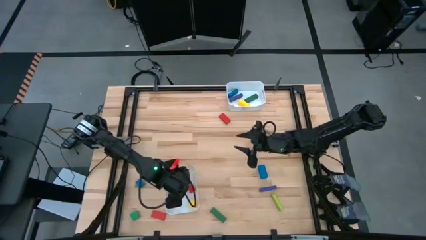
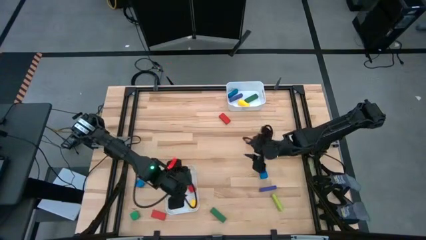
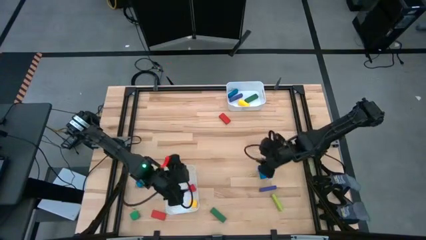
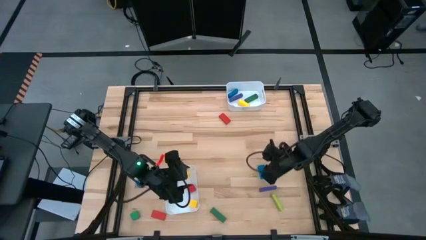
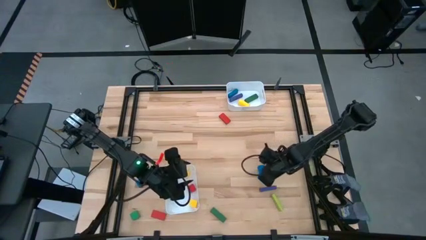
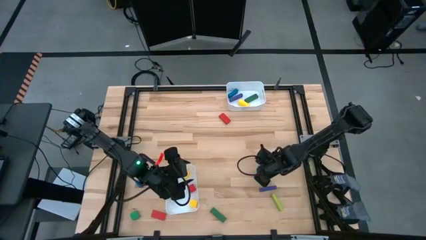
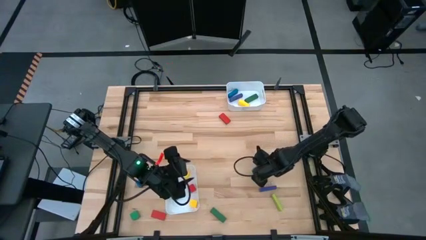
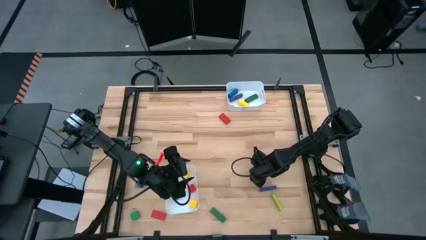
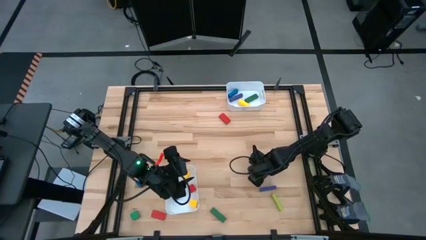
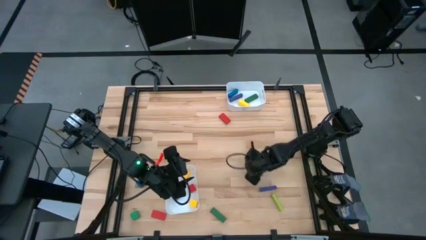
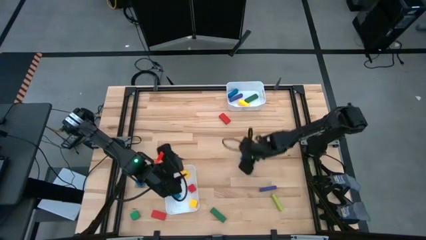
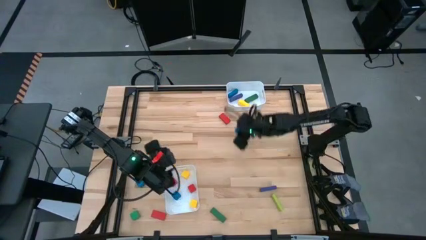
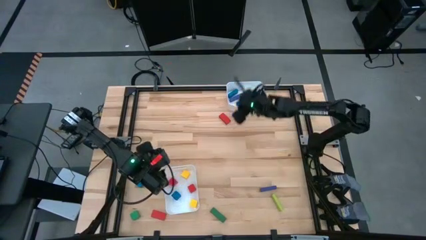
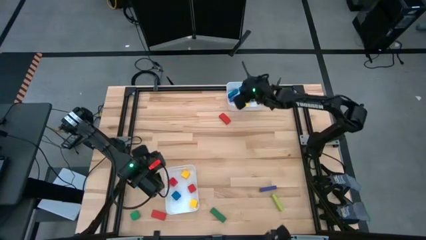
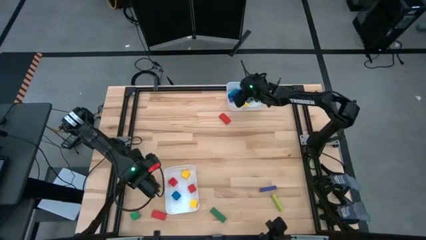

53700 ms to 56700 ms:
Task: Sort blocks by size
Put the blue large block into the top white bin

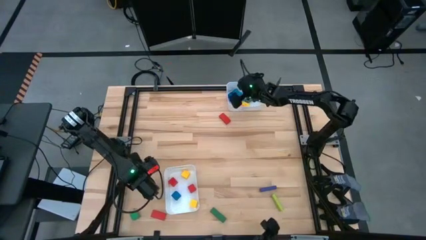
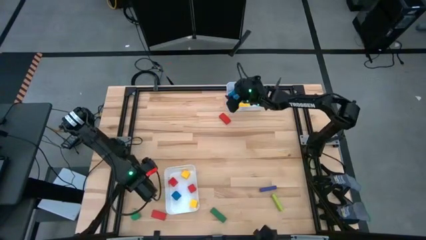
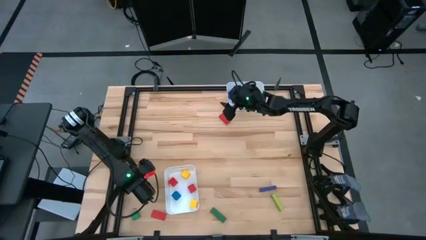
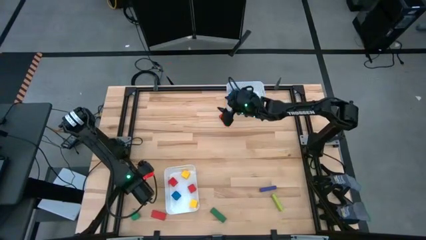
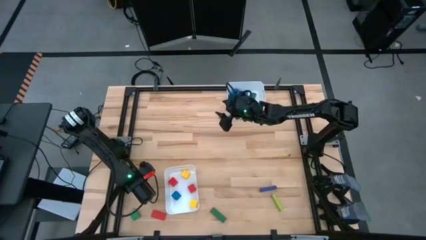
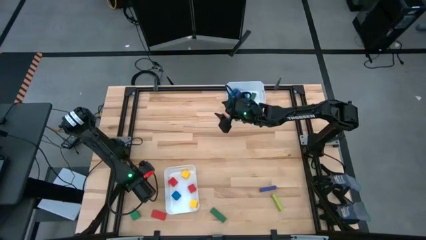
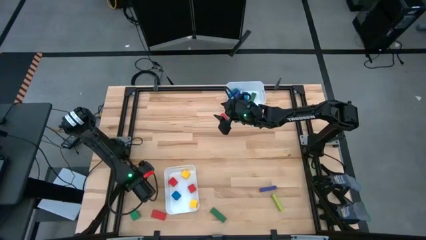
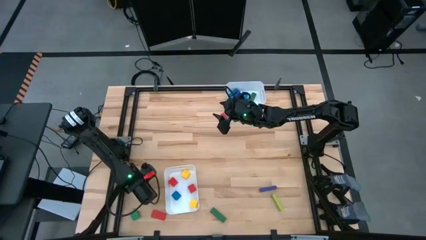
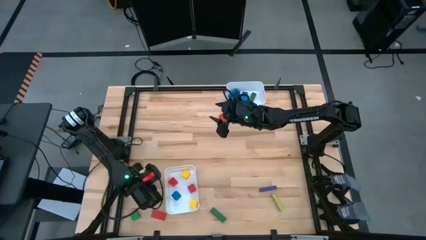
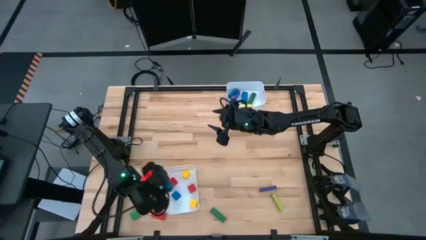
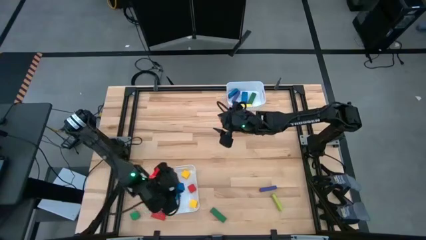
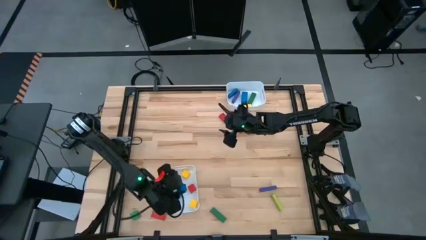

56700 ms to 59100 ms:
Put the blue small block into the bottom white bin

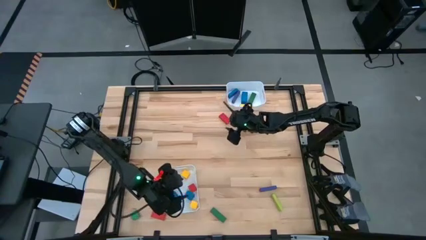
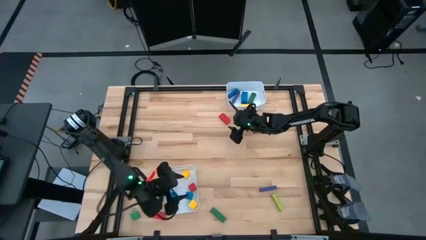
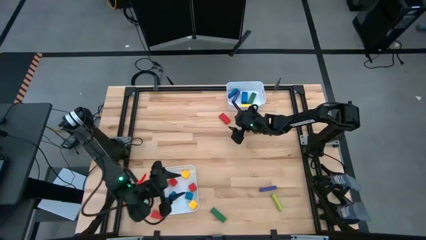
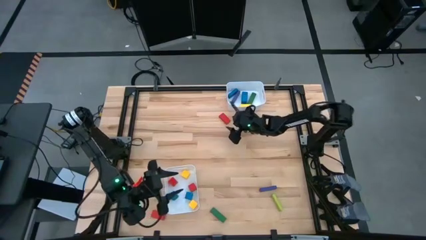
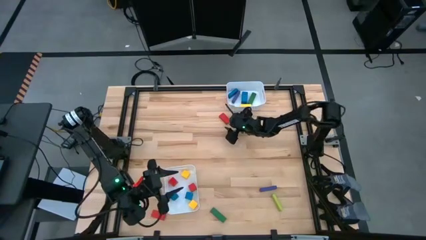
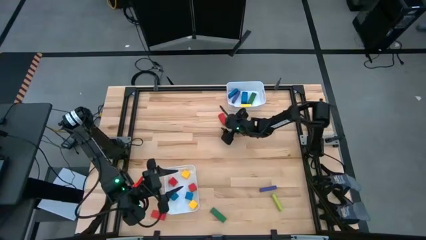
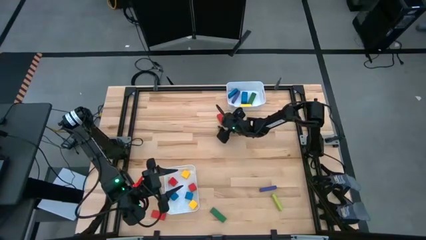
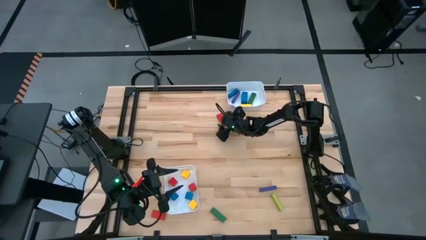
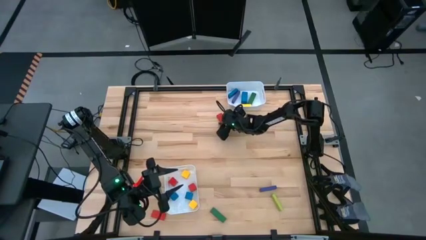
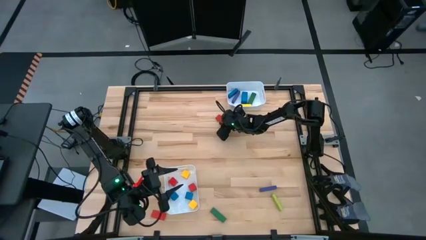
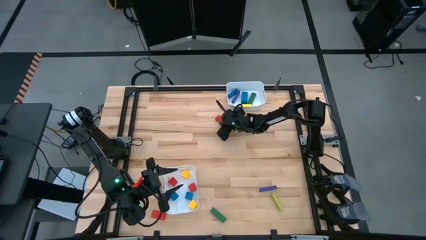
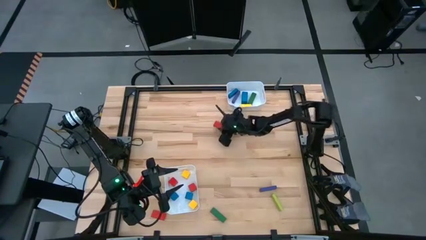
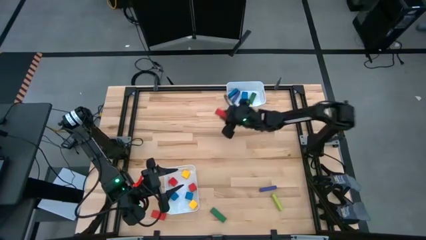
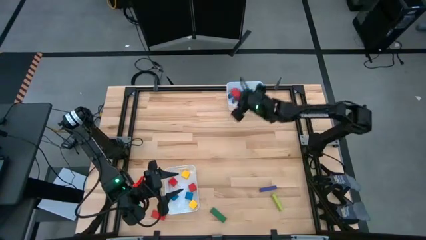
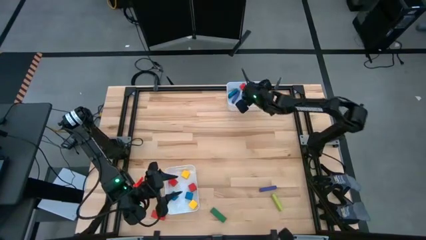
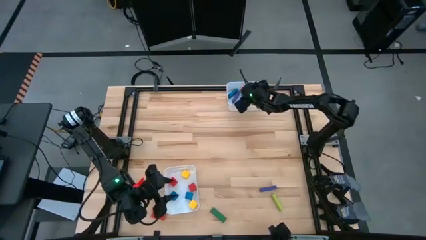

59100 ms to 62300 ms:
Put the orange large block into the top white bin

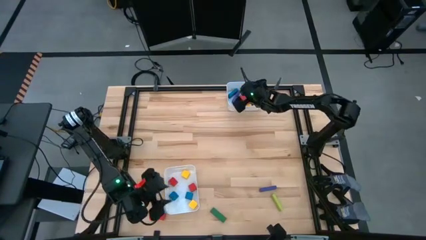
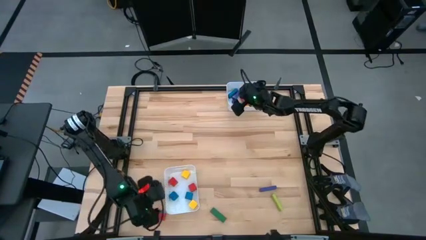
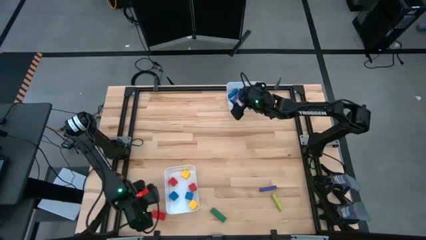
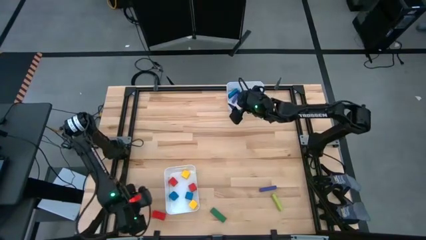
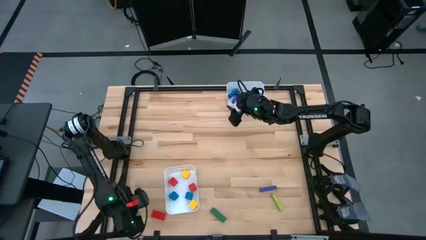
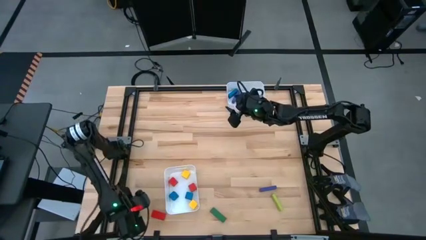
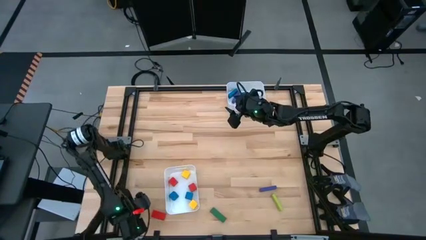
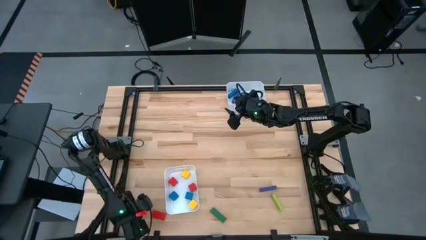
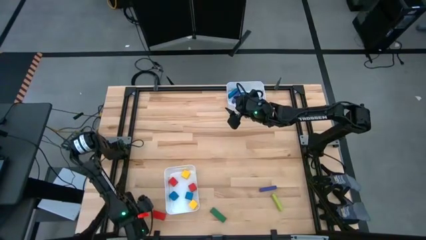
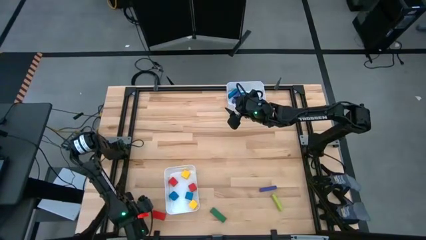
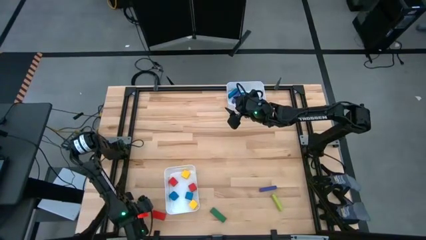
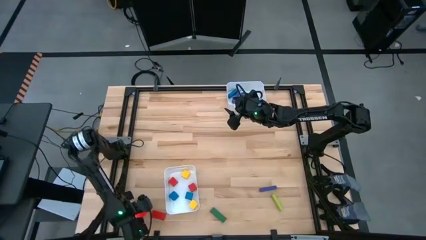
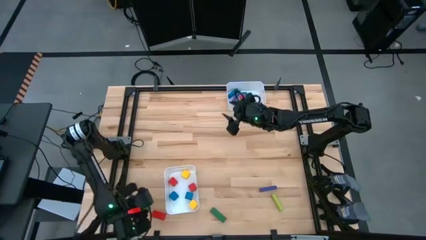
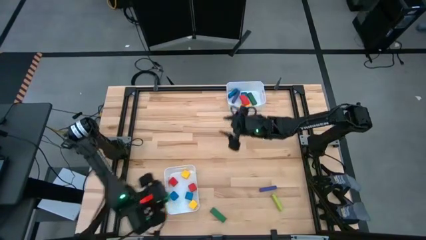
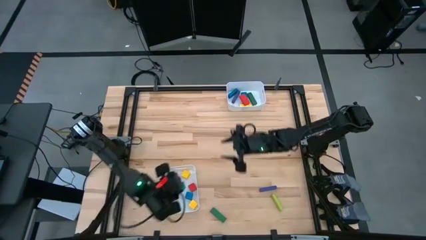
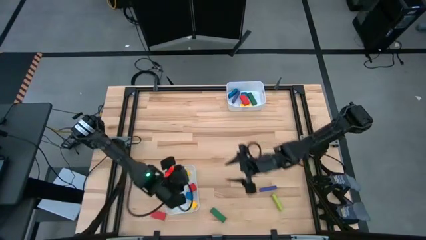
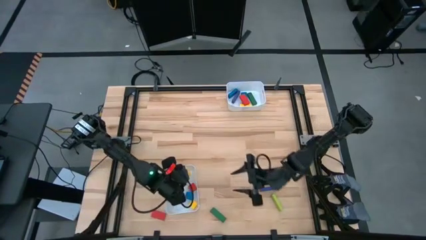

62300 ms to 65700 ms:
Put the green small block into the bottom white bin

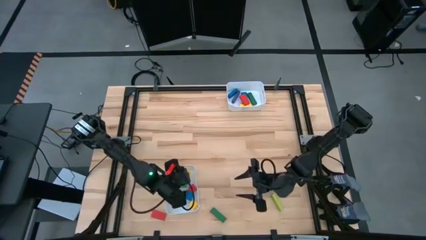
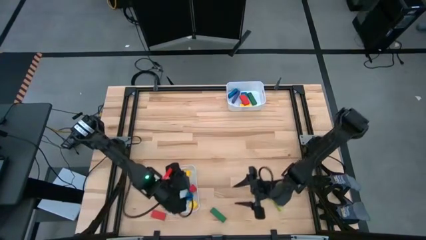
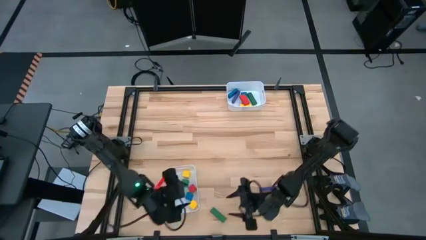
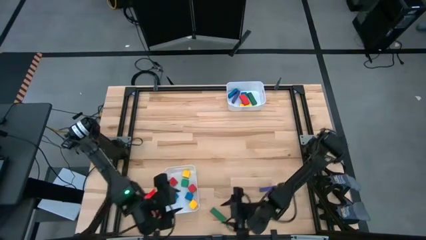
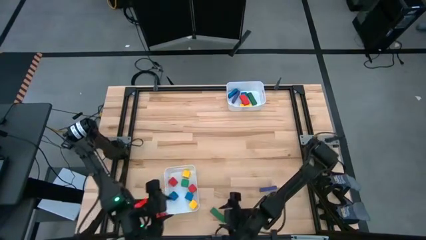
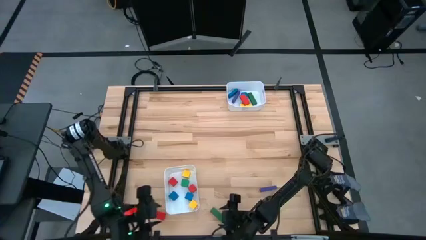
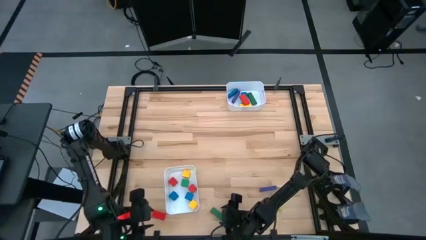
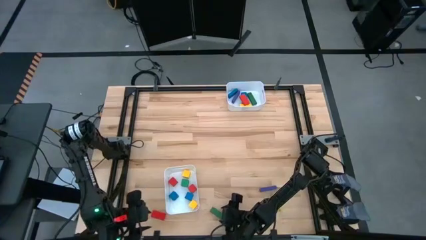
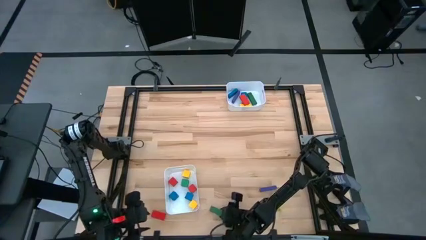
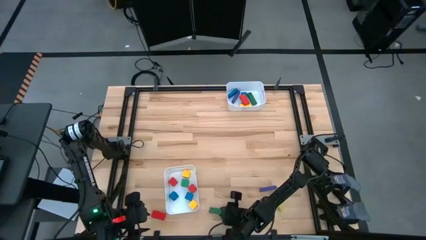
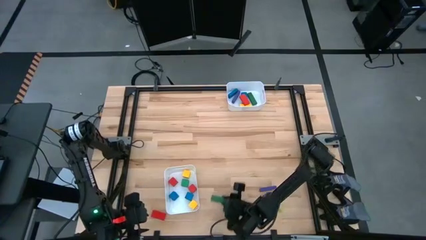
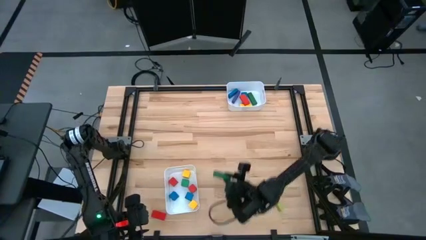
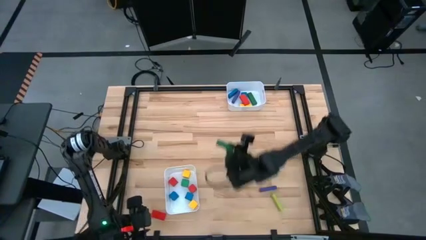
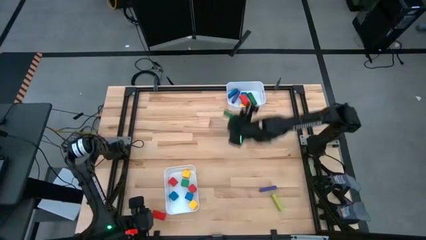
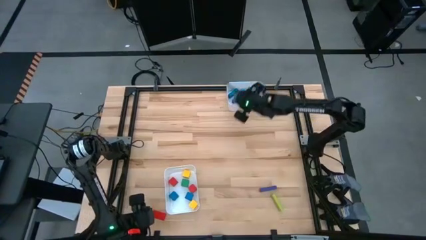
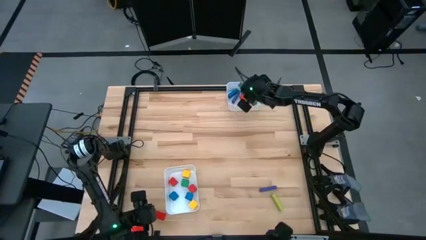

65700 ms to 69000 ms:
Put the green large block into the top white bin

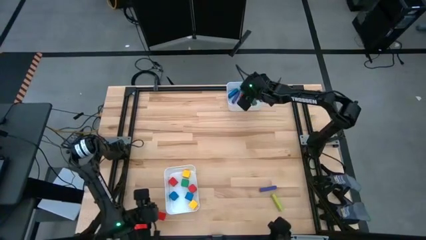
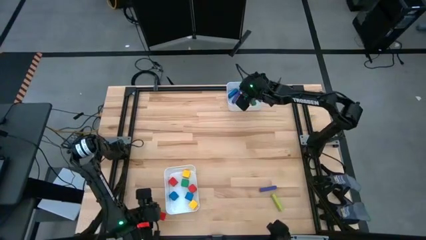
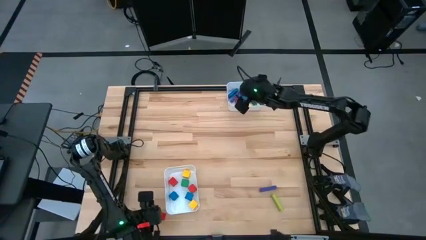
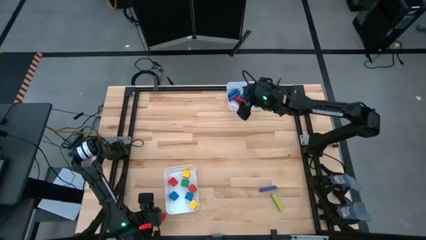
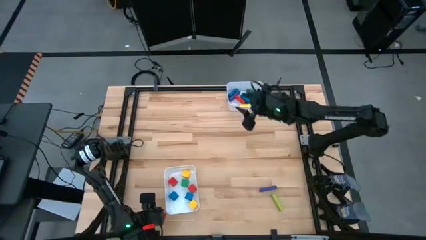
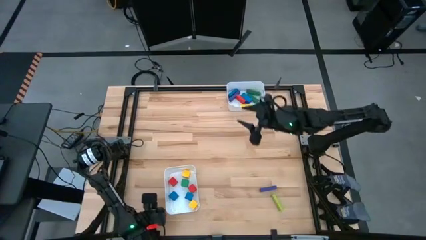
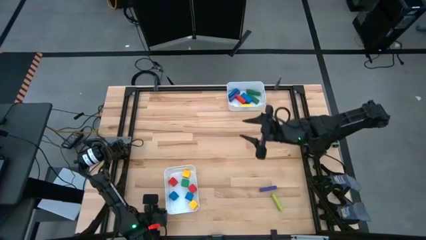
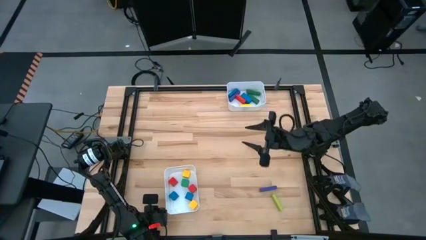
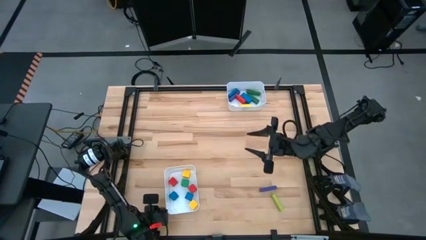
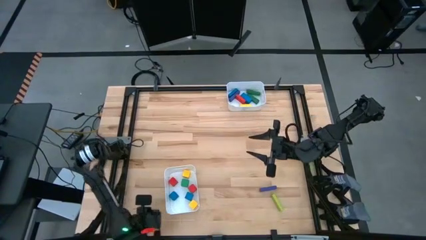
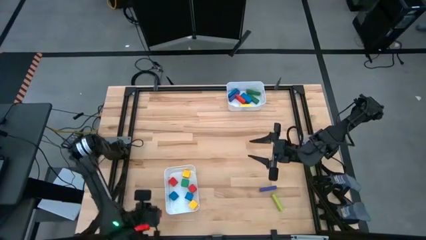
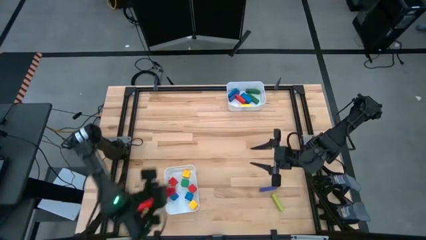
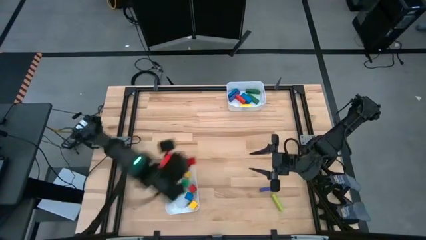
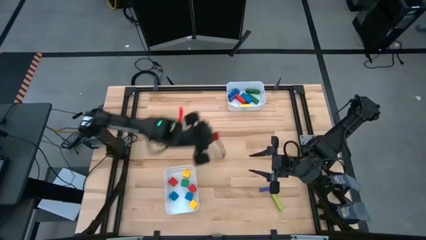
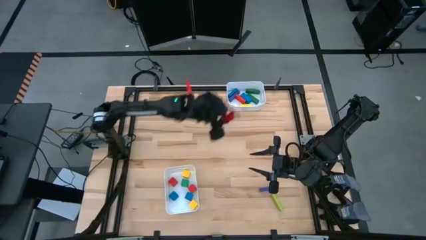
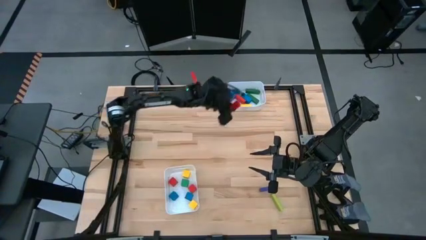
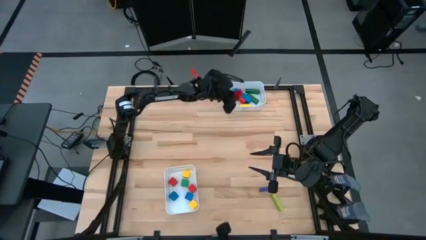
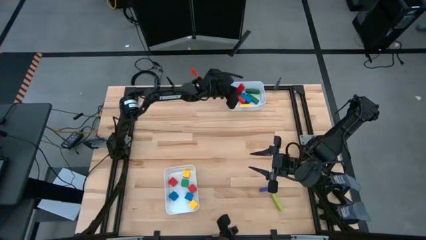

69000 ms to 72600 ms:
Put the orange large block into the top white bin
